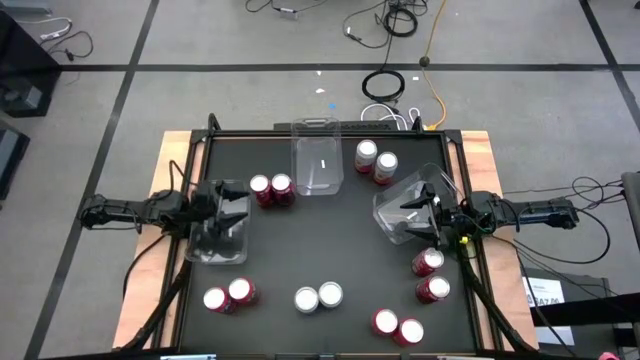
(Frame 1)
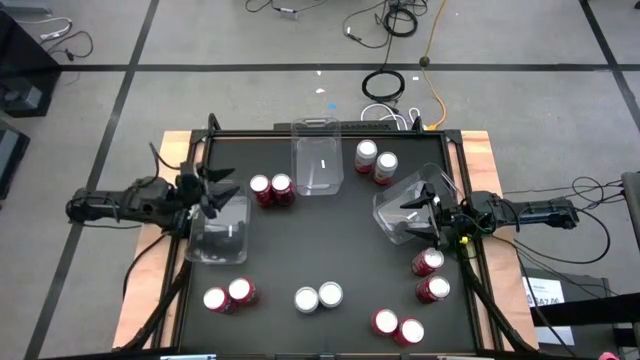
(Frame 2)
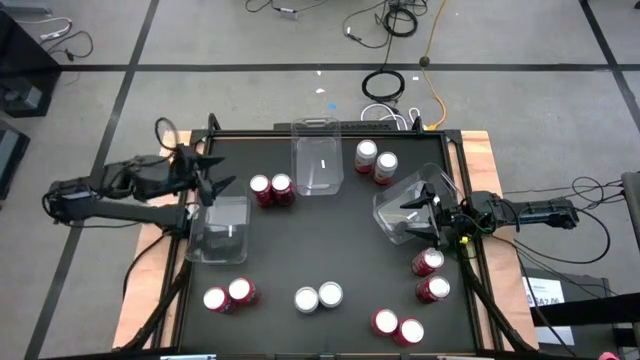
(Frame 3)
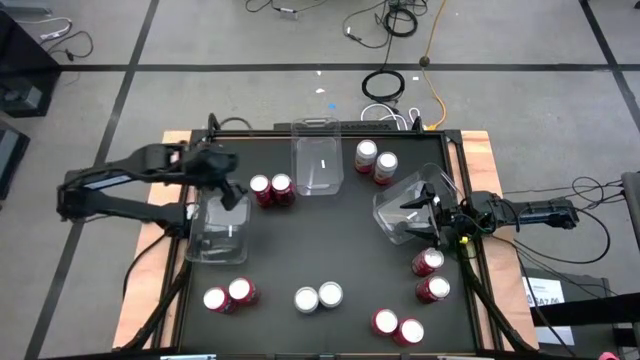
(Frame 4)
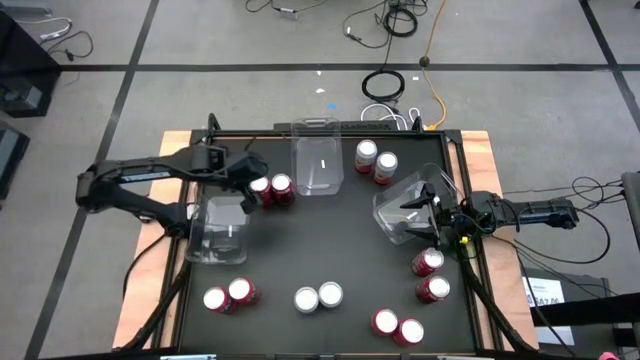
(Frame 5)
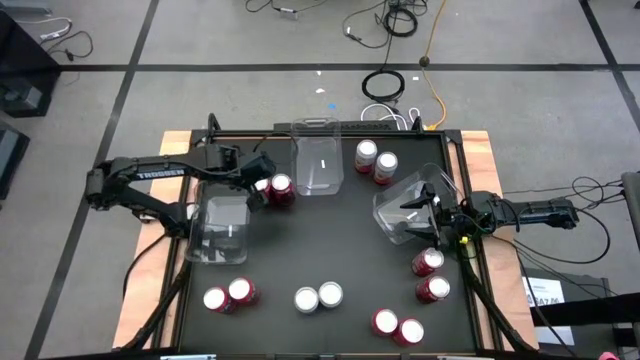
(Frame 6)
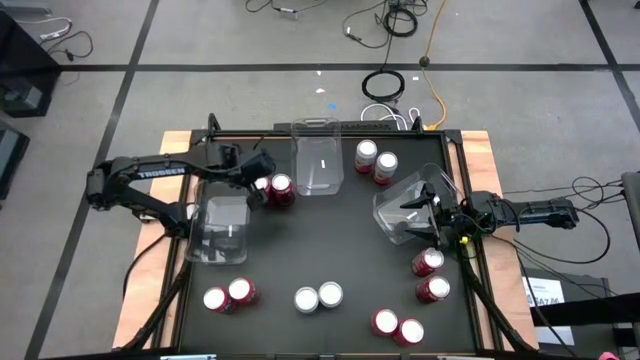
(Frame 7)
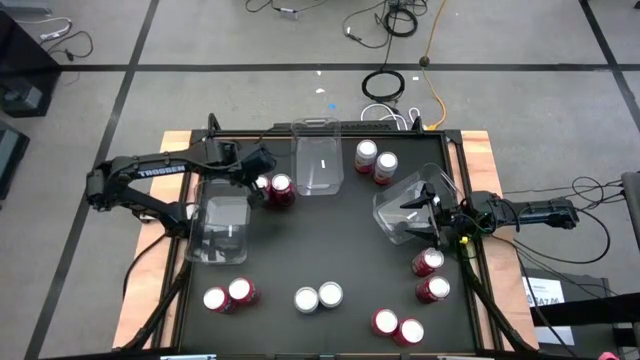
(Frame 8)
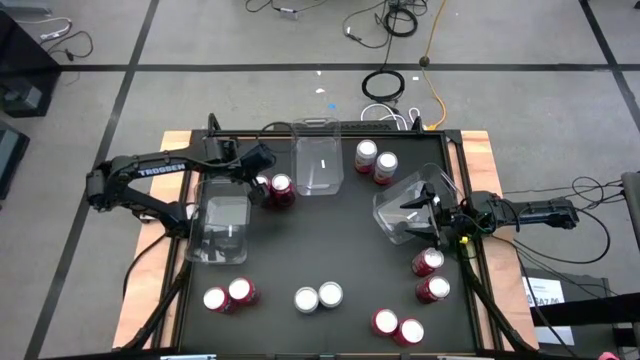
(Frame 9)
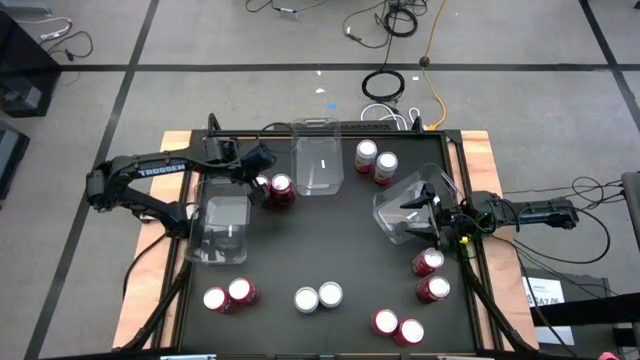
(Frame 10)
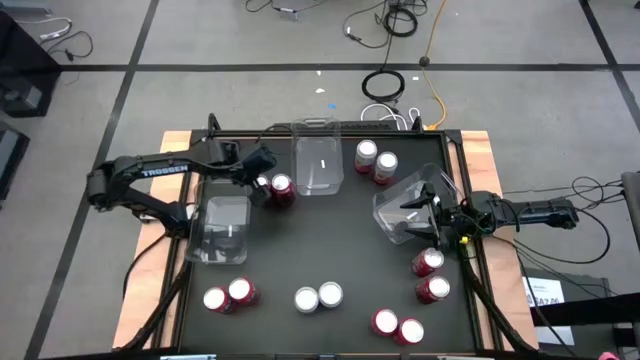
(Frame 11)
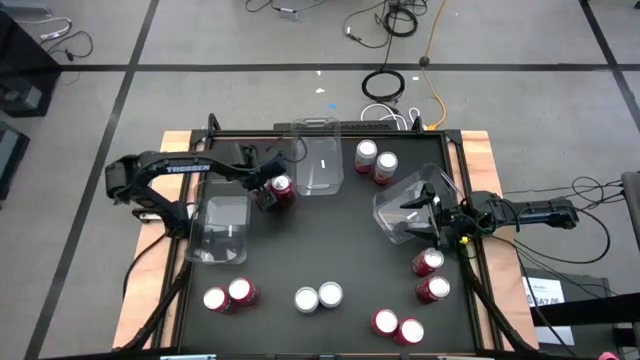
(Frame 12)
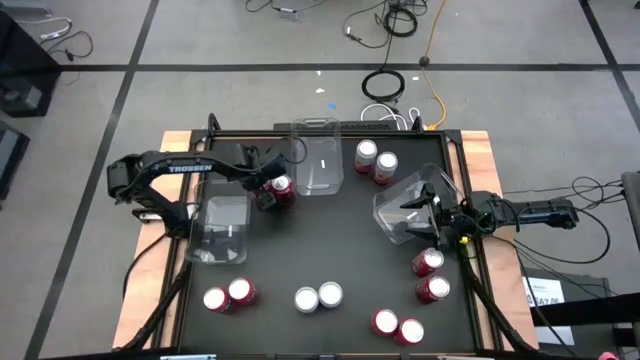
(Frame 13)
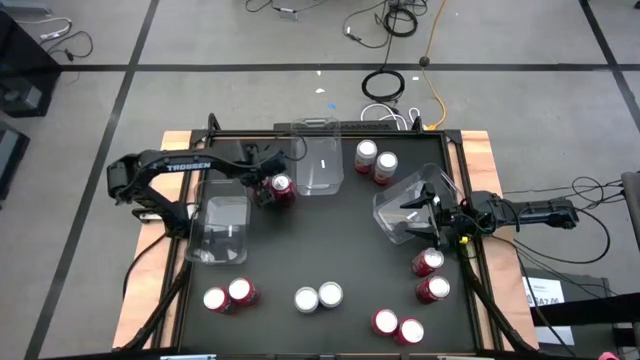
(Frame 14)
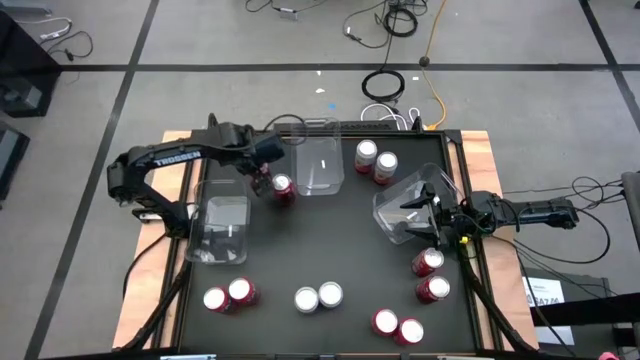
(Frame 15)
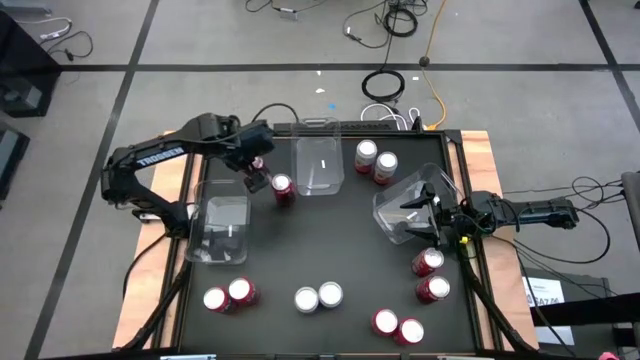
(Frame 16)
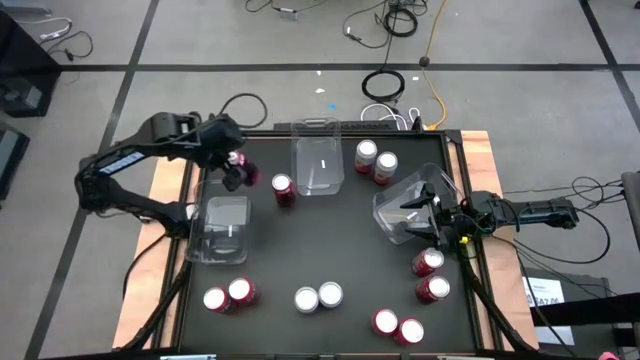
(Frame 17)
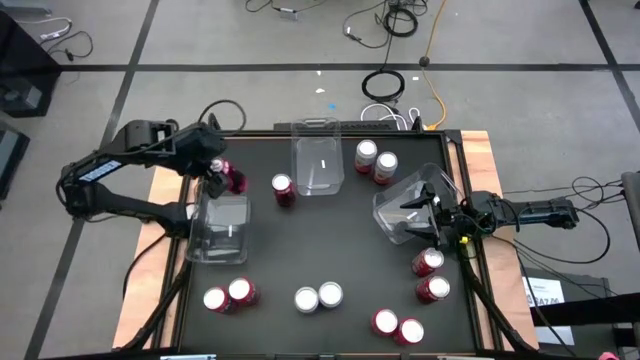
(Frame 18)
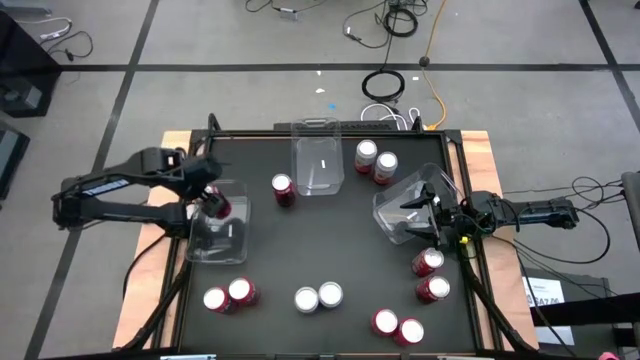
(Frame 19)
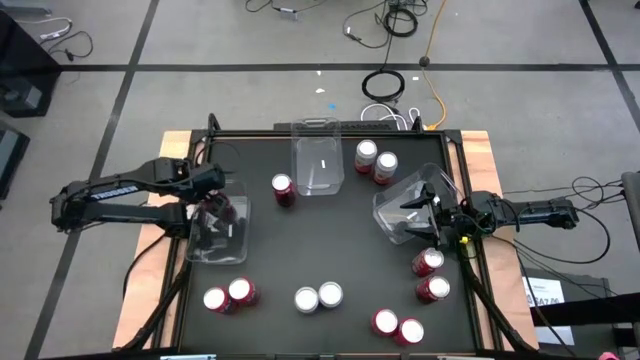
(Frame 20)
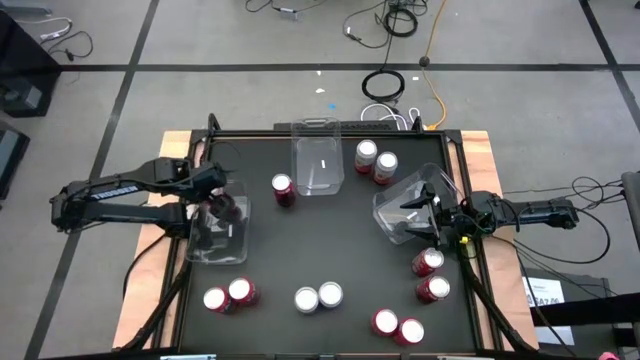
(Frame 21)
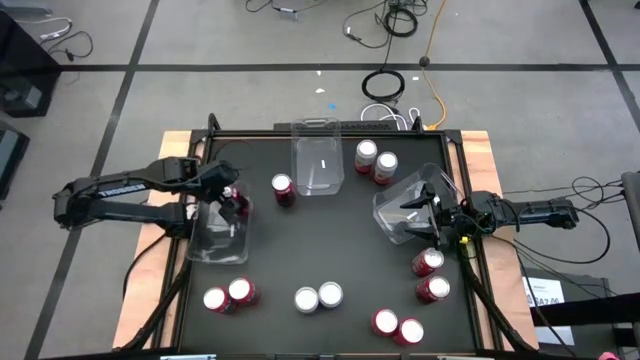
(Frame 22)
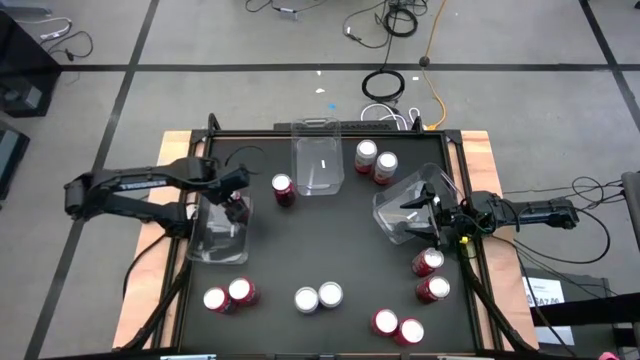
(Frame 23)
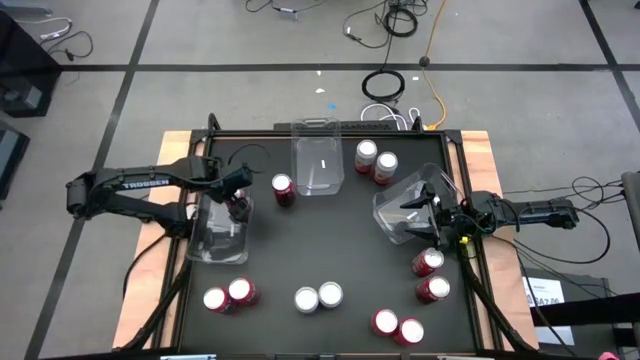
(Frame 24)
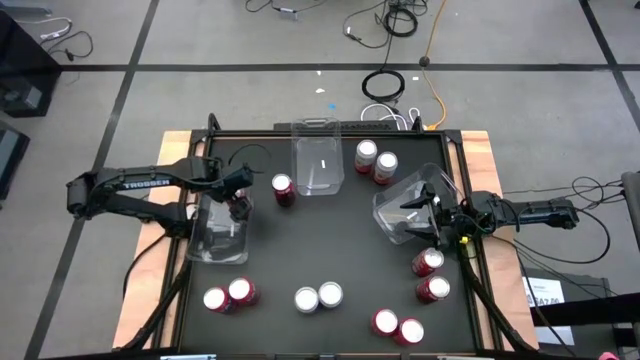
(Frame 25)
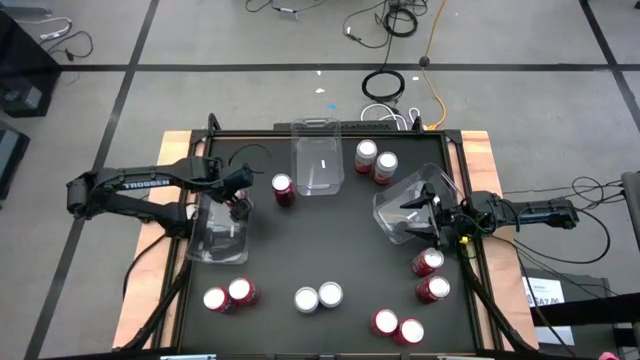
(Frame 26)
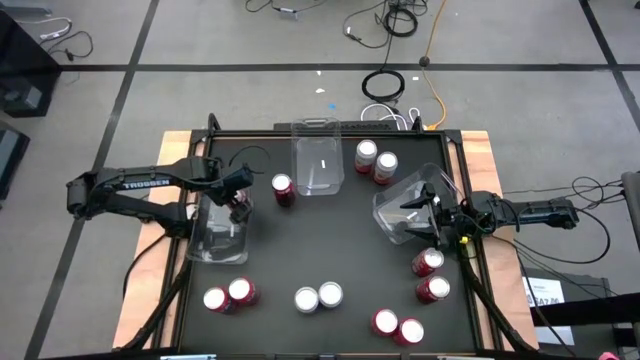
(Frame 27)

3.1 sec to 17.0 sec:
Task: Sort soda cans
Put the top left red soda can into the left transparent bin

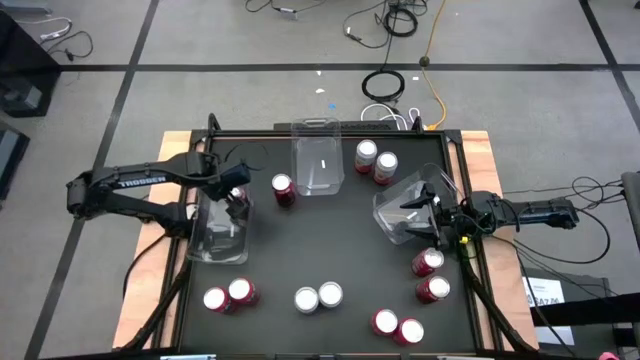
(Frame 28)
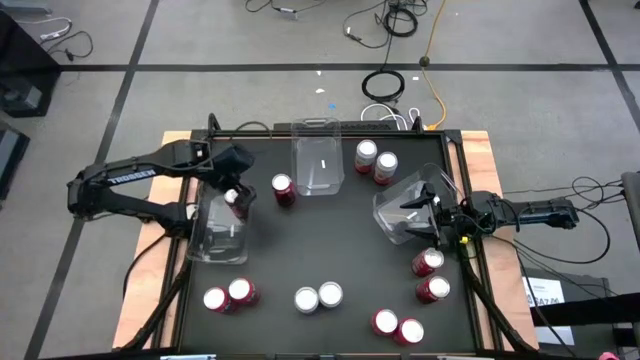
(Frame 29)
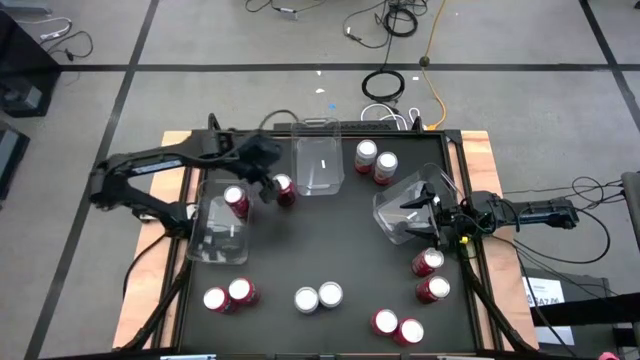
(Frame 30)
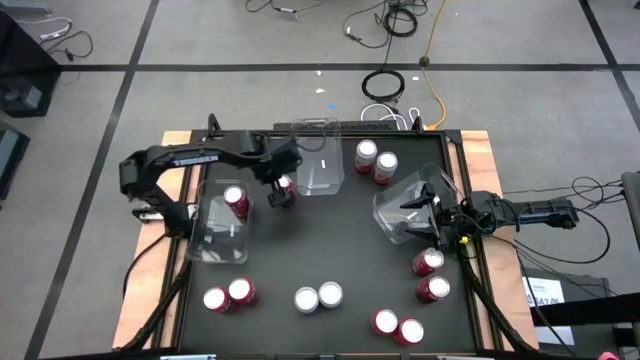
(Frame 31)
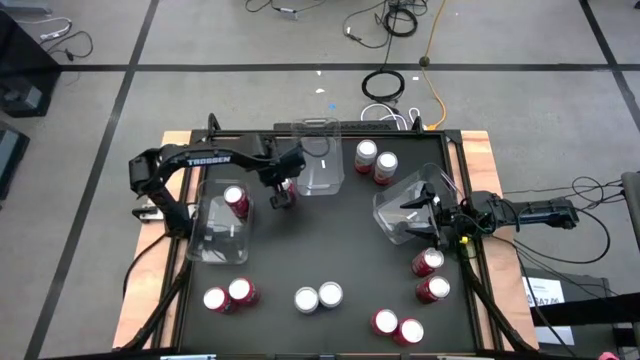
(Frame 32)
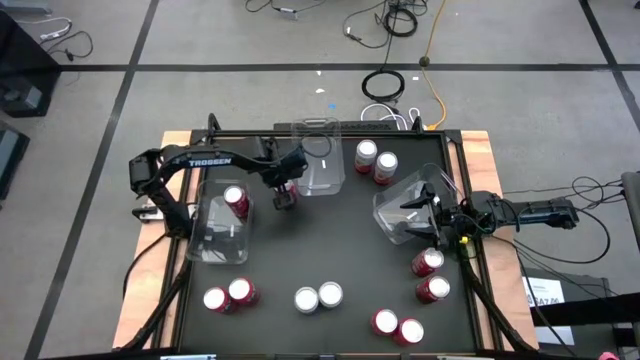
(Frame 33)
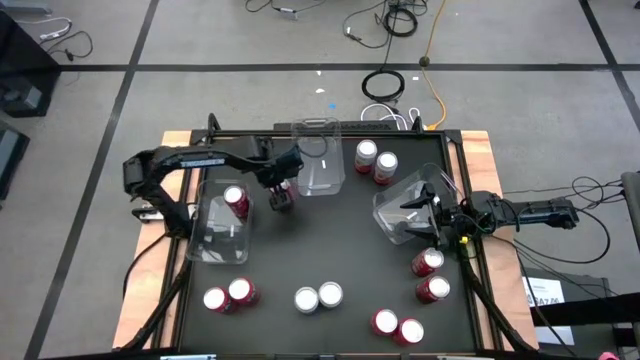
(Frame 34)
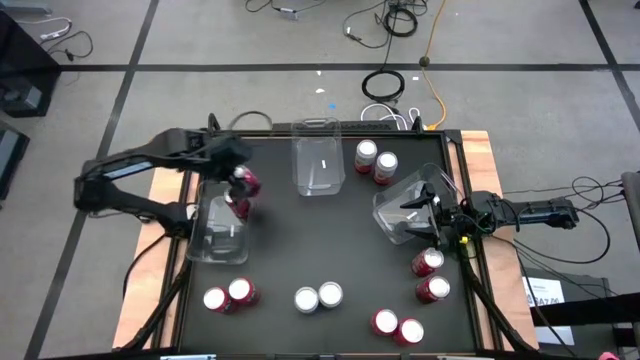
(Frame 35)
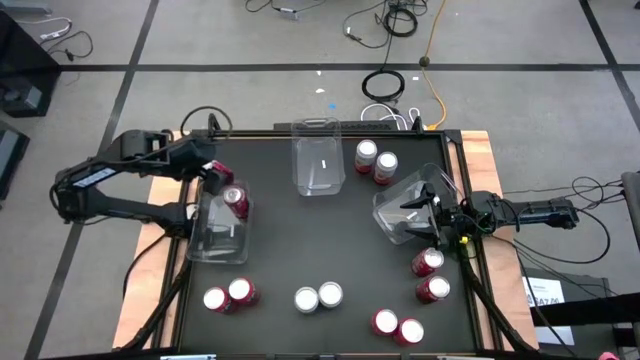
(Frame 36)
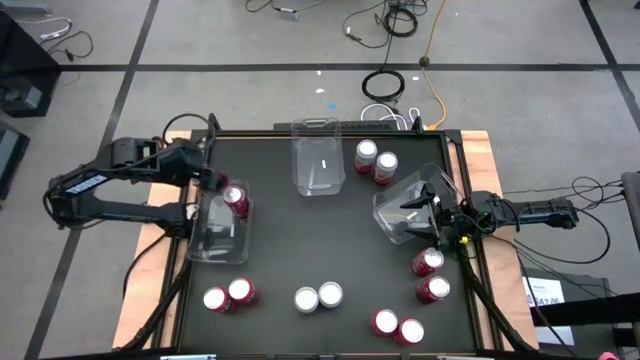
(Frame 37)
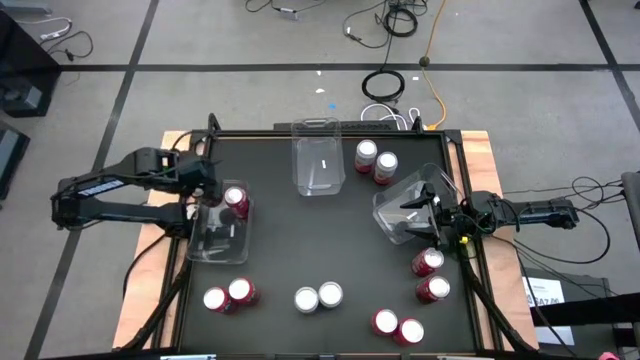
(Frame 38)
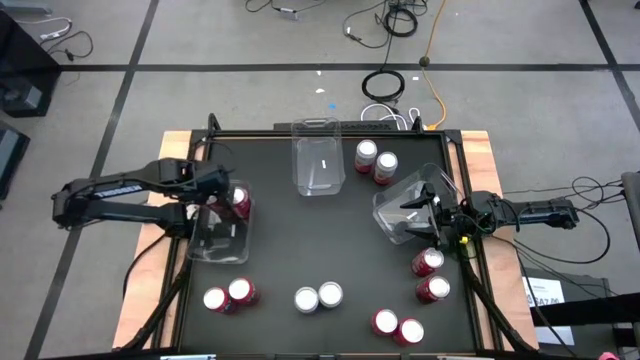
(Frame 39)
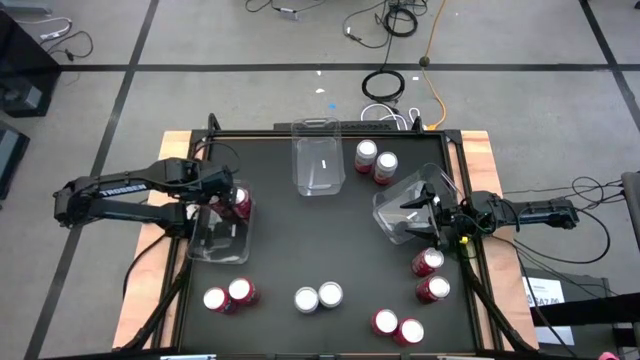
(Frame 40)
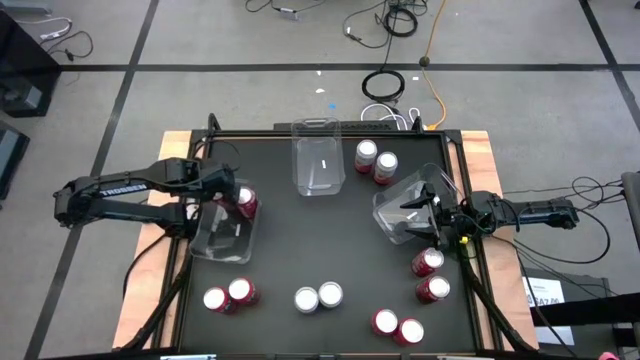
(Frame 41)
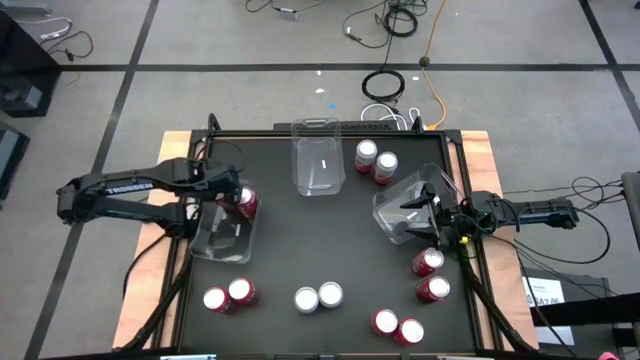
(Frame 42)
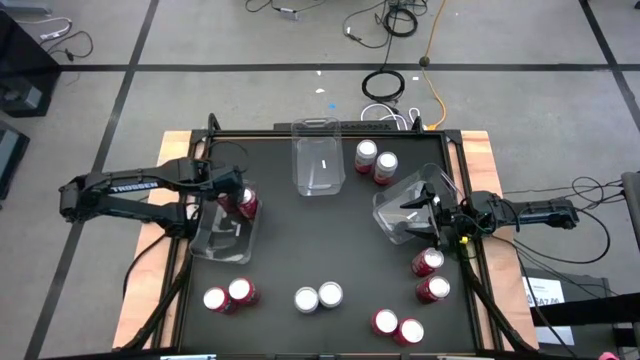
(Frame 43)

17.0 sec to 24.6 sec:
Put the top right red soda can into the left transparent bin
